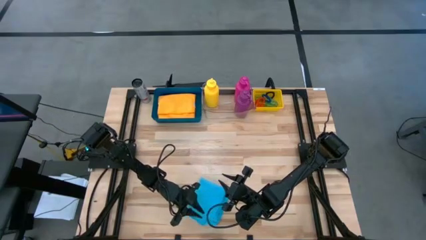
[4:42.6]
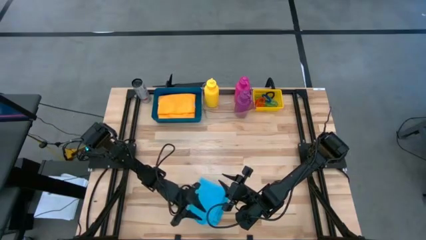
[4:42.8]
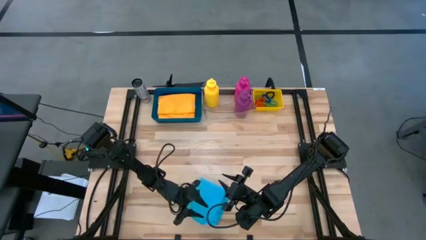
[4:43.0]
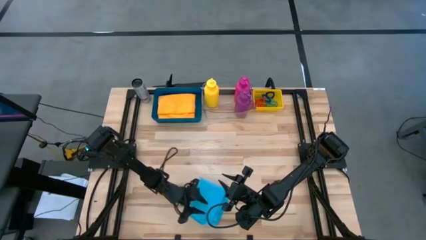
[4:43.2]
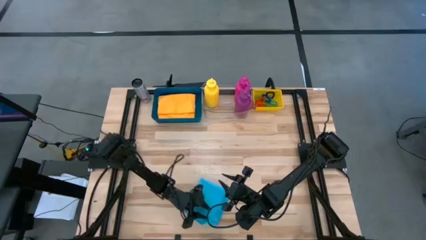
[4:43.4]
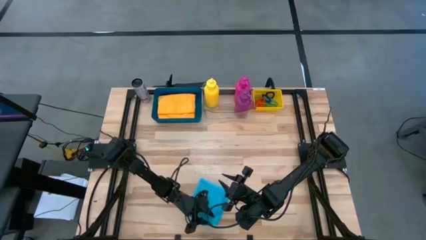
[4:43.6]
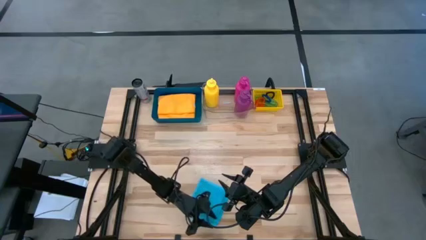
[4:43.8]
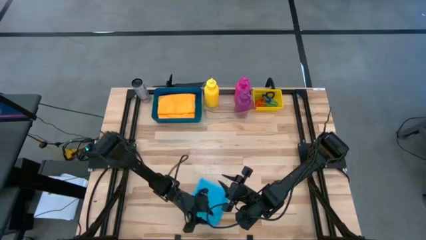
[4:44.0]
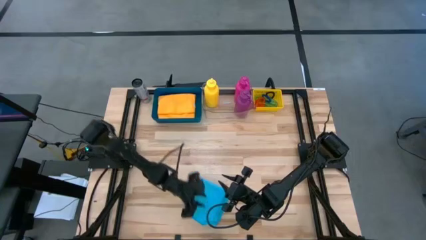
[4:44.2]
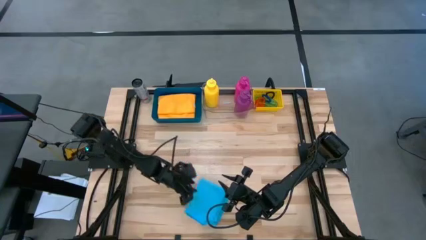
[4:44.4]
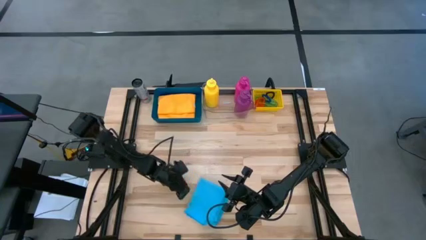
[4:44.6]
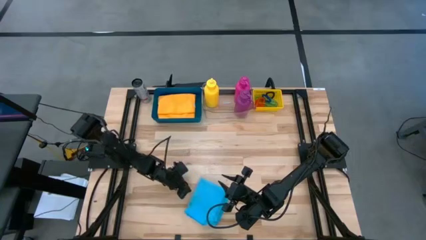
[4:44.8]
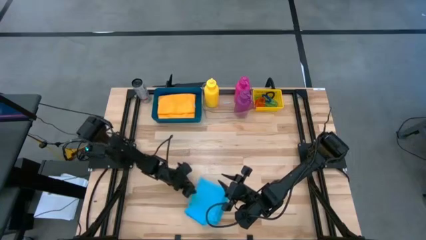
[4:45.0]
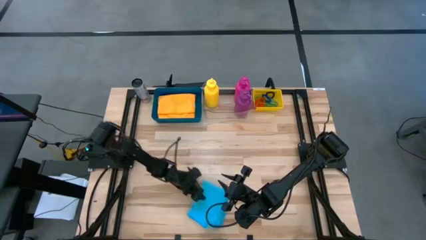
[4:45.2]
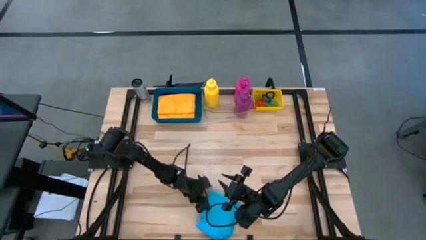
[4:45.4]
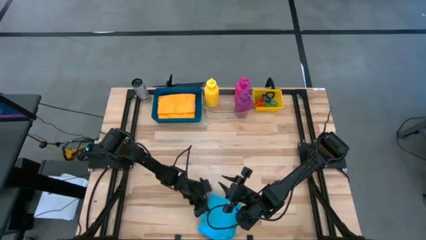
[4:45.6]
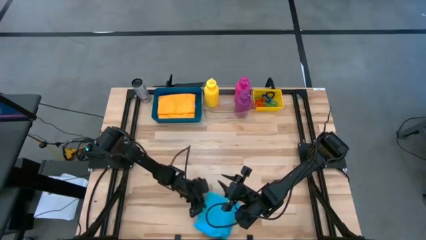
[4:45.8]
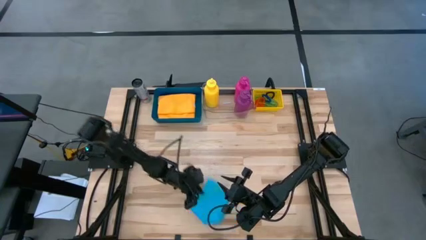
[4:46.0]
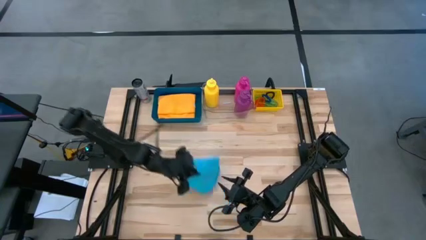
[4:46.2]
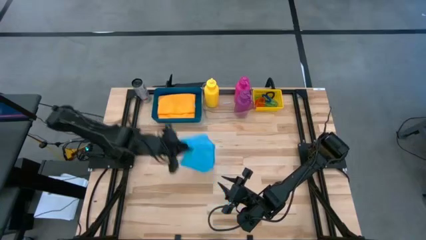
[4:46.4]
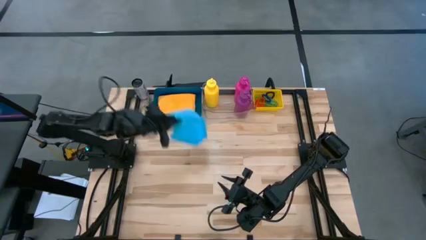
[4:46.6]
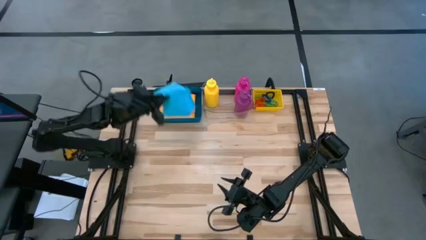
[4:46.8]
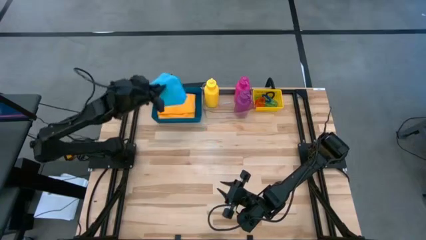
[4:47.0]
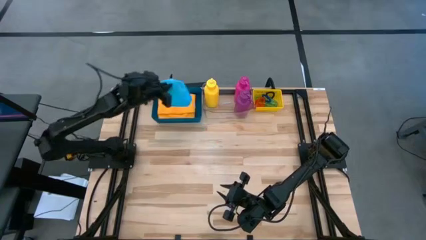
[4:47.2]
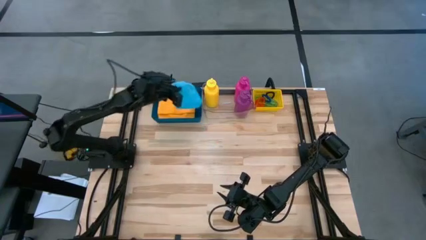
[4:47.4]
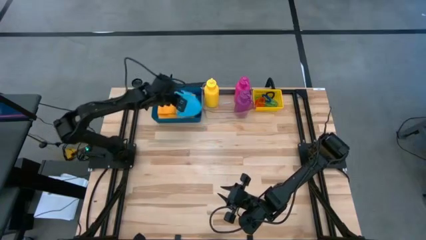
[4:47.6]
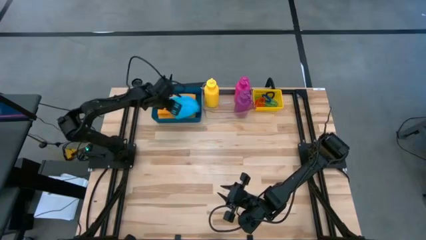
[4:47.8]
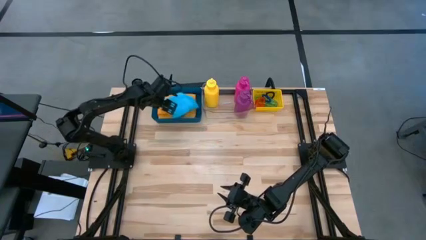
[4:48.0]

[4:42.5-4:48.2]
Task: Pick & Place Sports Items
Put the blue towel into the blue bin

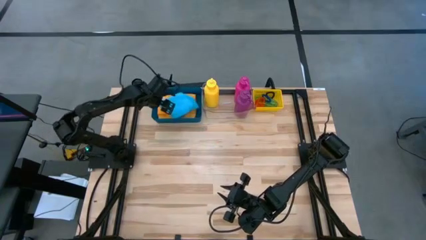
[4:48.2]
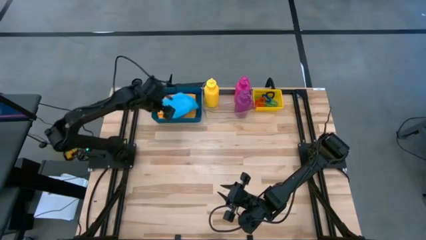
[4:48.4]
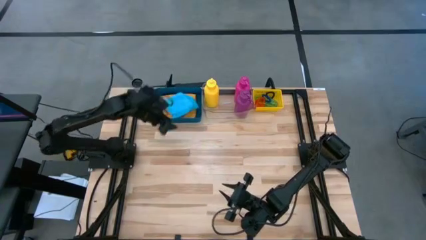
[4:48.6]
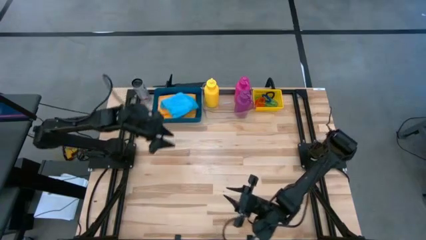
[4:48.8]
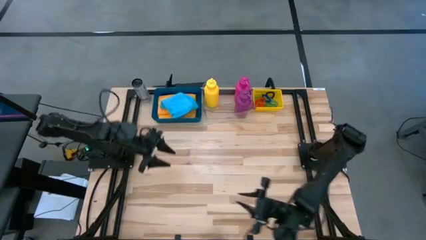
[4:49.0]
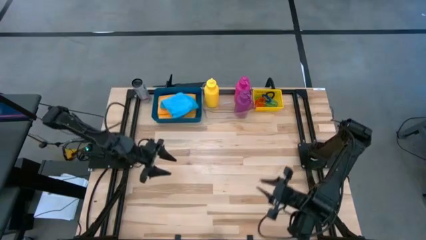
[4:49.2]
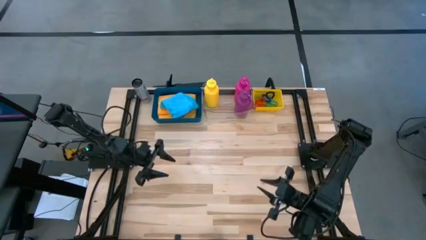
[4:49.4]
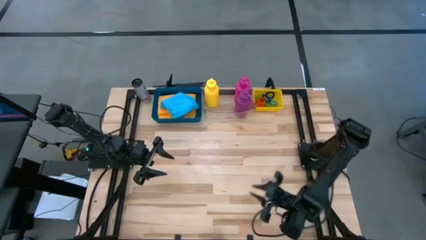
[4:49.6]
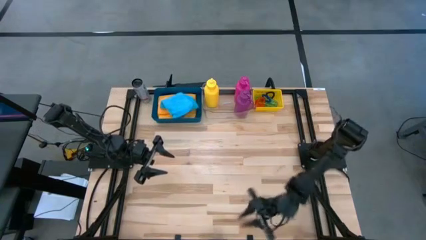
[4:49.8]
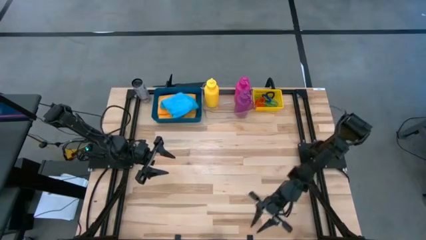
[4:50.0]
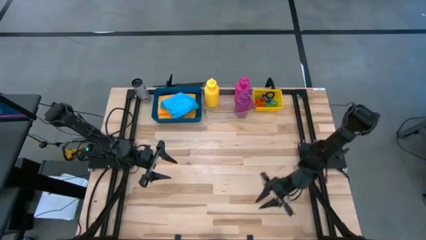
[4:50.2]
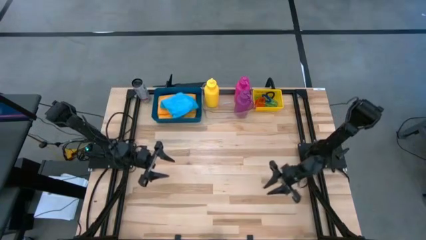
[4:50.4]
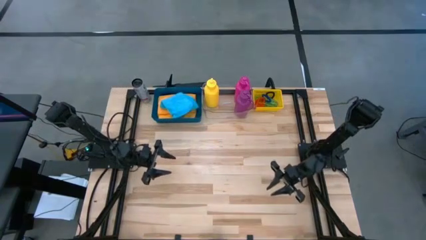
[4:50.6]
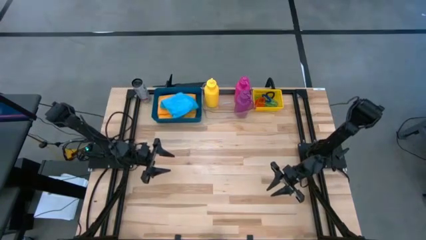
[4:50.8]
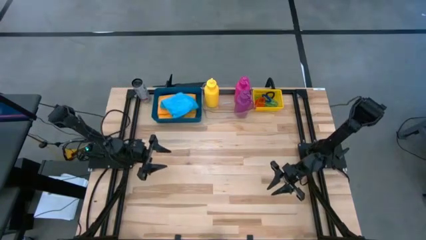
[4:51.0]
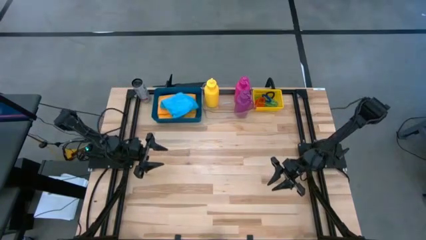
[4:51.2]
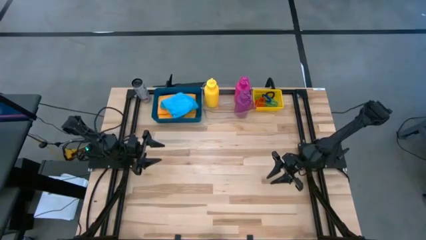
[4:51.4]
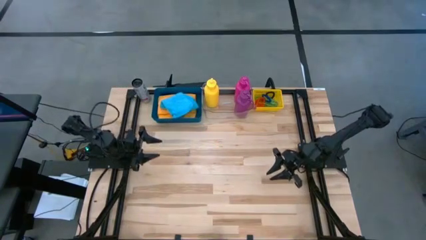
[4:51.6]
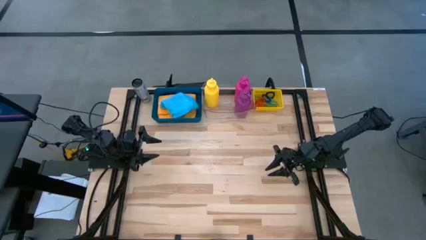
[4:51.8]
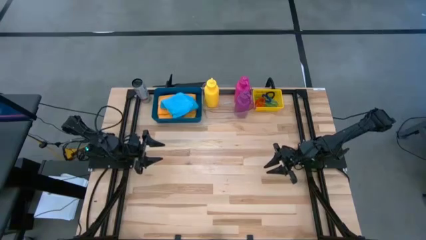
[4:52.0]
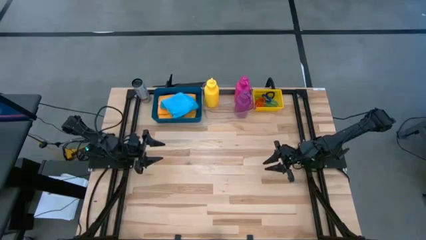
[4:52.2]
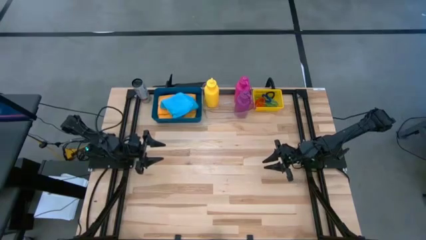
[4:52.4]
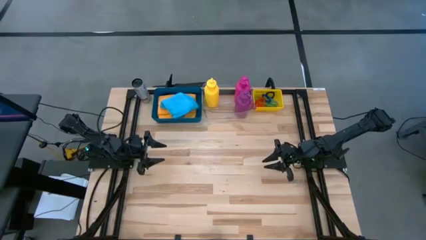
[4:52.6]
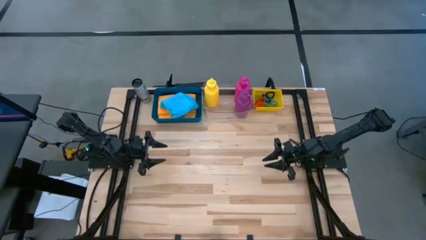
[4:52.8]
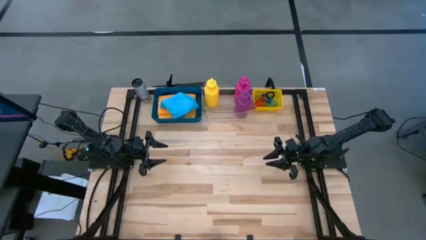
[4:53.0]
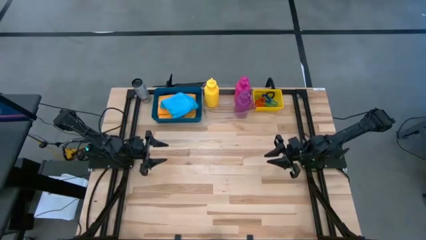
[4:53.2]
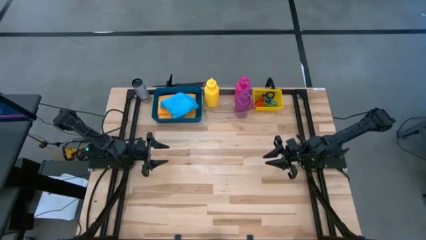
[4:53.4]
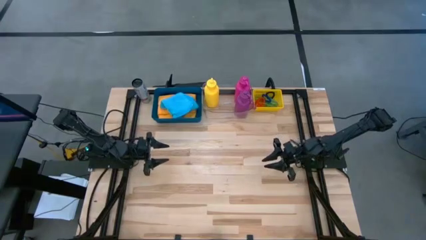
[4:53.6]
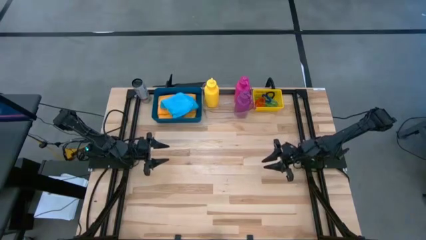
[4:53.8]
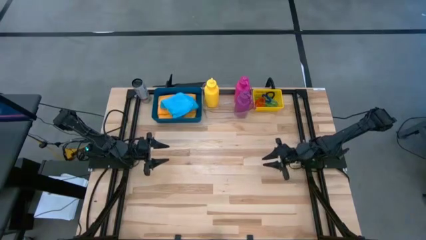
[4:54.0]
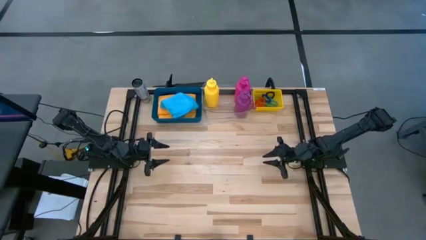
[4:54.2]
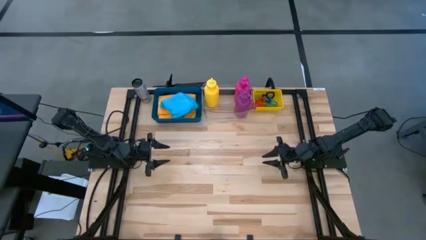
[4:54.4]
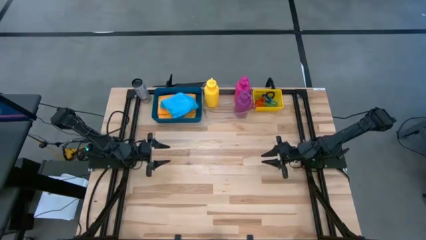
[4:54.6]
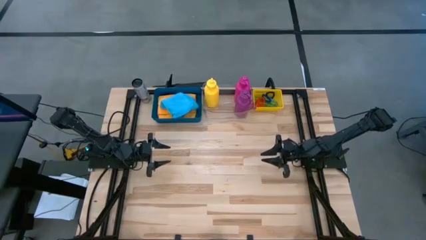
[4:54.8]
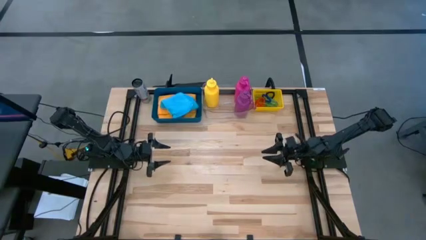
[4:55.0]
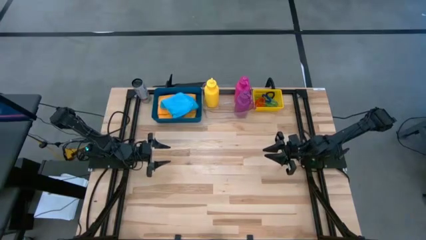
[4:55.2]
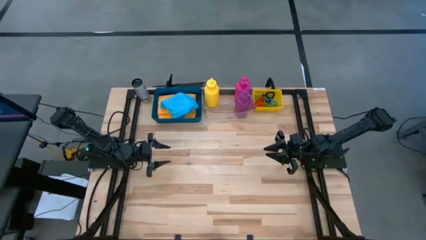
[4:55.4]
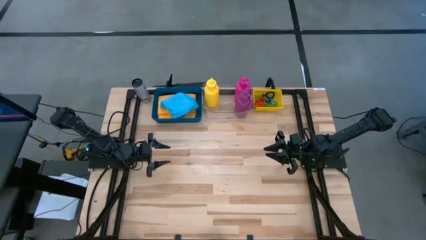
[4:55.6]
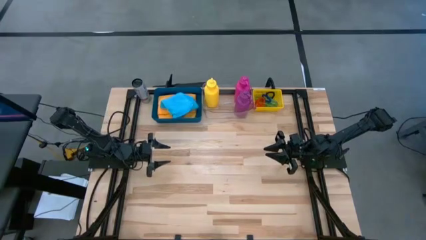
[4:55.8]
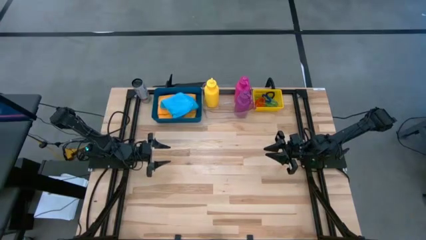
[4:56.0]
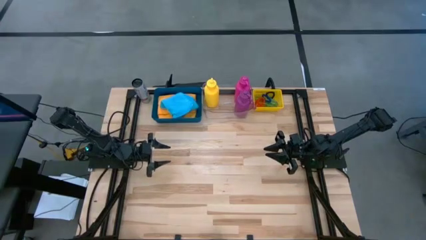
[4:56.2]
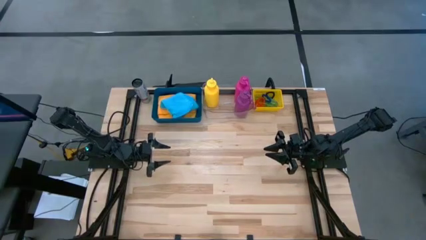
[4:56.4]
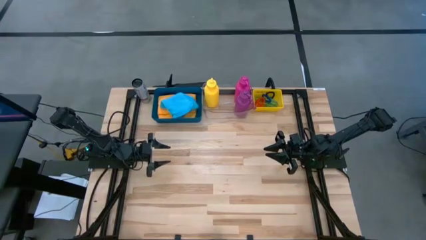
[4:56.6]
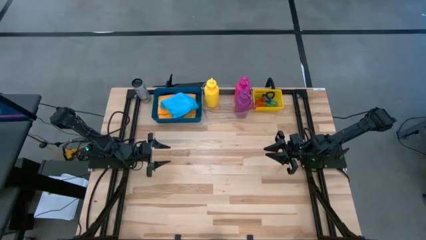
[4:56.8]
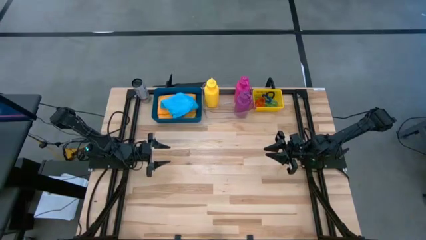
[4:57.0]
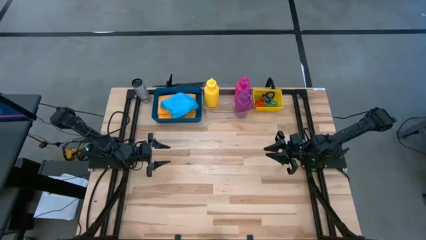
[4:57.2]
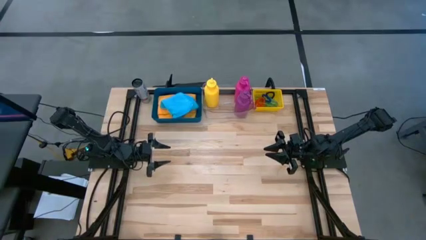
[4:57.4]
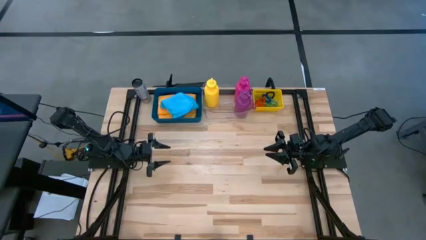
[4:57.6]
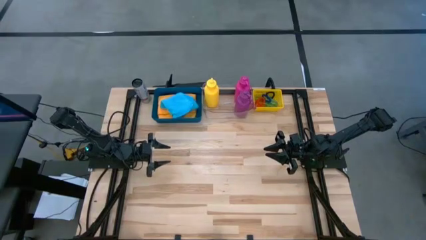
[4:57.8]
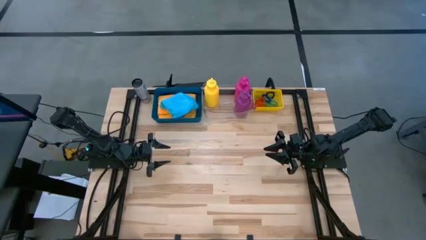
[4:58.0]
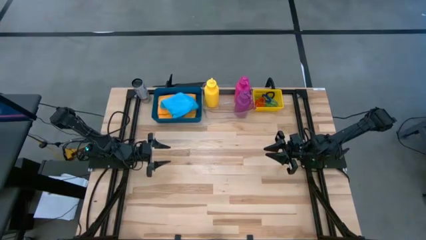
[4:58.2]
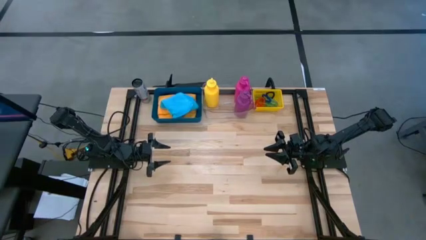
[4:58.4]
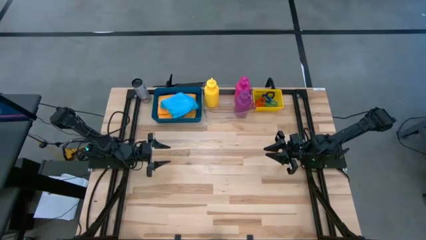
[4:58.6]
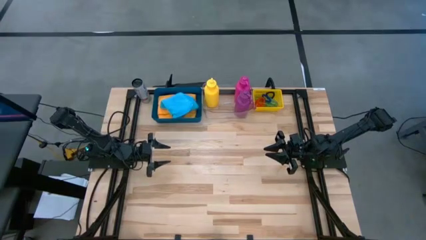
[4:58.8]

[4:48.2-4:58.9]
Return to Home Position
